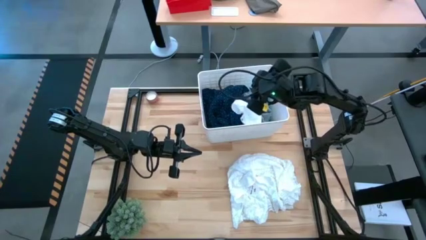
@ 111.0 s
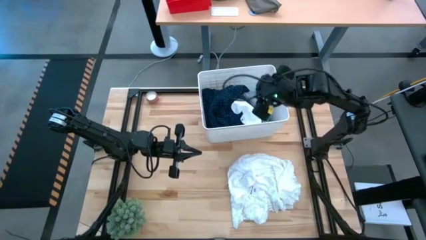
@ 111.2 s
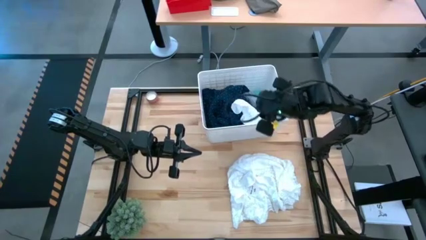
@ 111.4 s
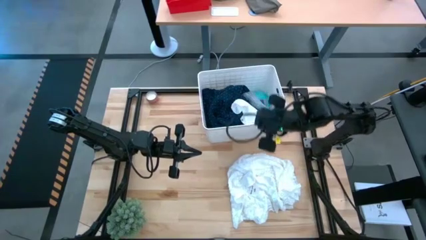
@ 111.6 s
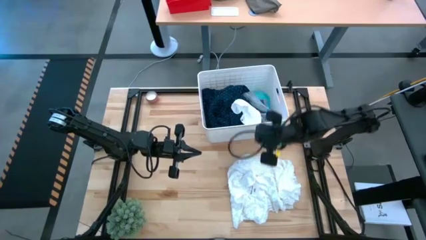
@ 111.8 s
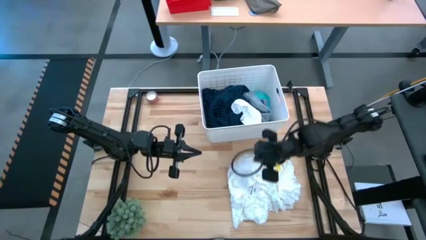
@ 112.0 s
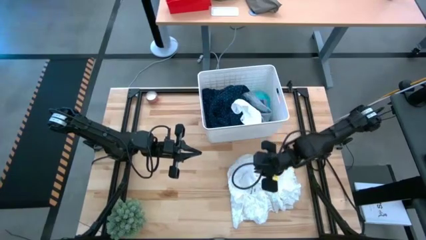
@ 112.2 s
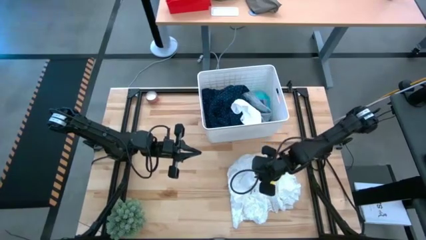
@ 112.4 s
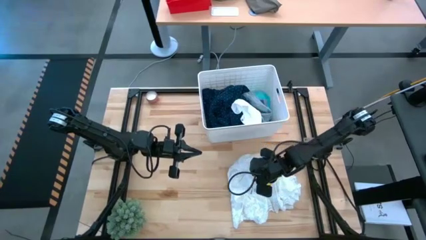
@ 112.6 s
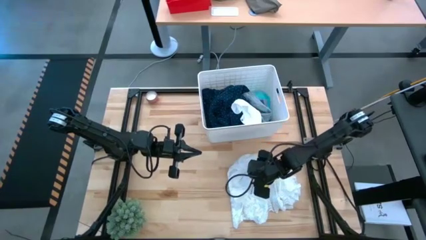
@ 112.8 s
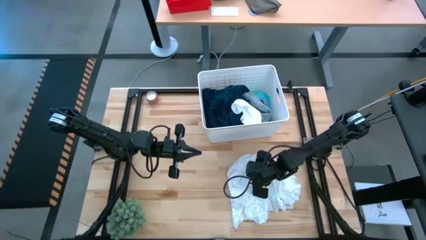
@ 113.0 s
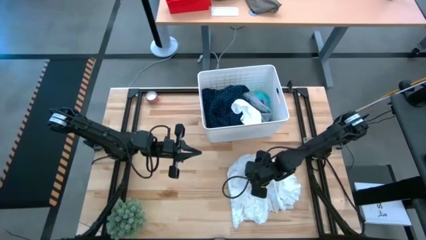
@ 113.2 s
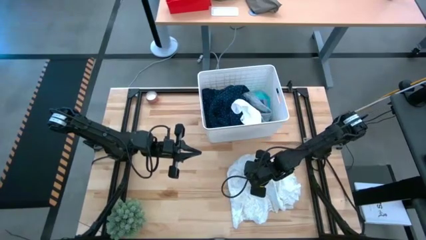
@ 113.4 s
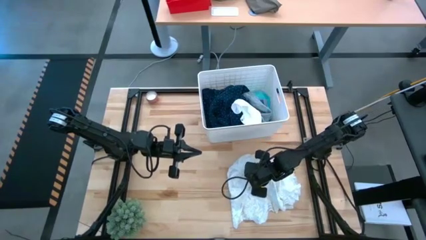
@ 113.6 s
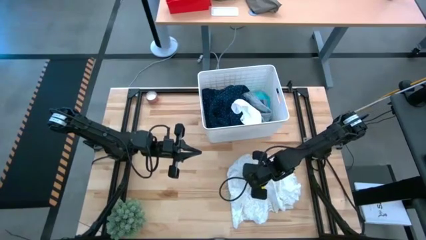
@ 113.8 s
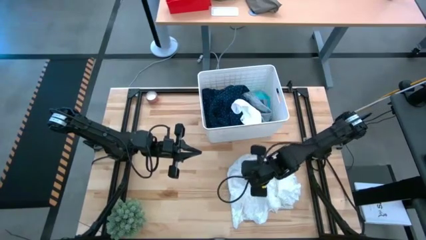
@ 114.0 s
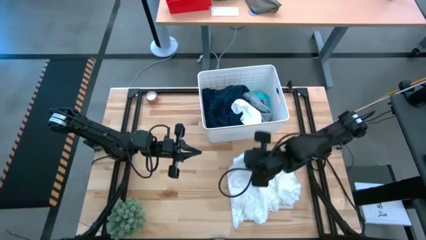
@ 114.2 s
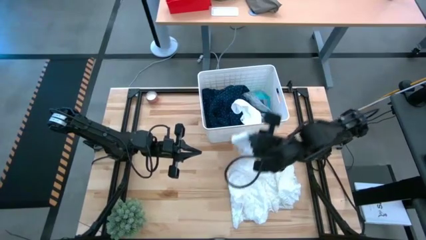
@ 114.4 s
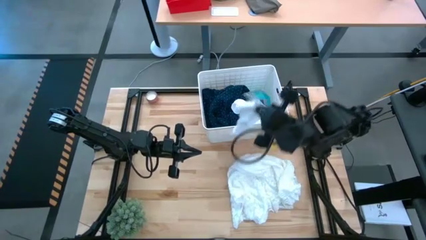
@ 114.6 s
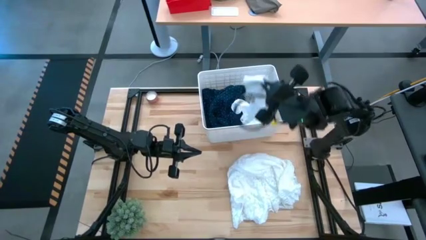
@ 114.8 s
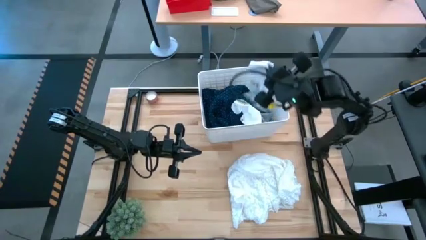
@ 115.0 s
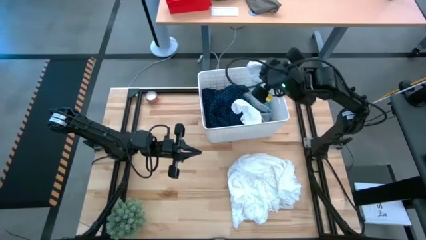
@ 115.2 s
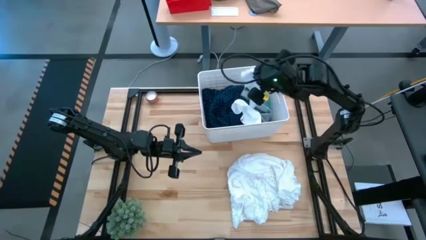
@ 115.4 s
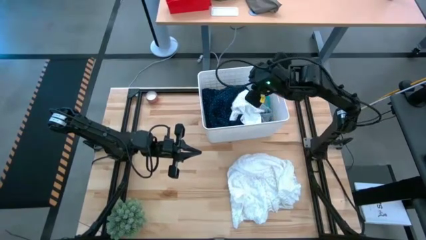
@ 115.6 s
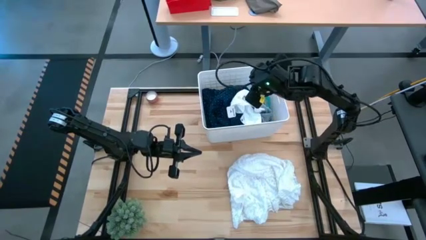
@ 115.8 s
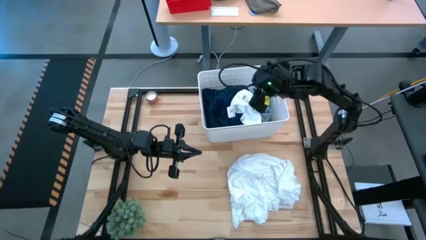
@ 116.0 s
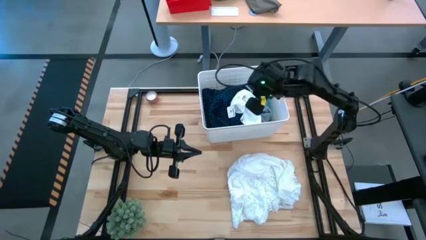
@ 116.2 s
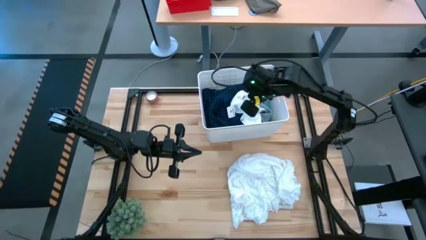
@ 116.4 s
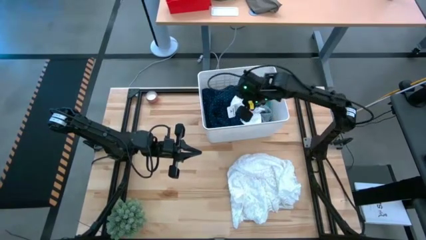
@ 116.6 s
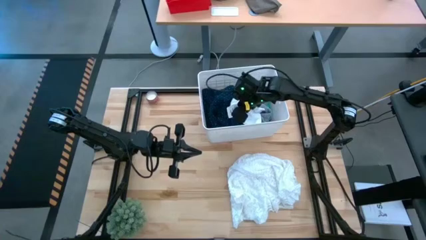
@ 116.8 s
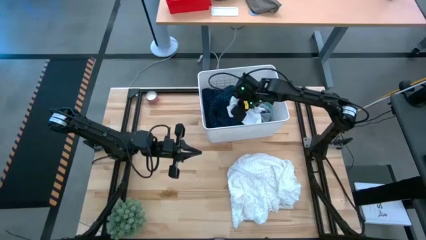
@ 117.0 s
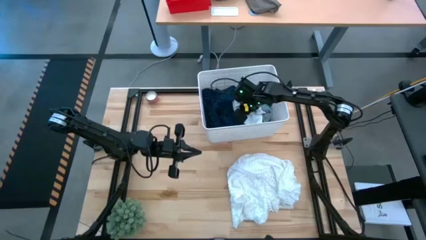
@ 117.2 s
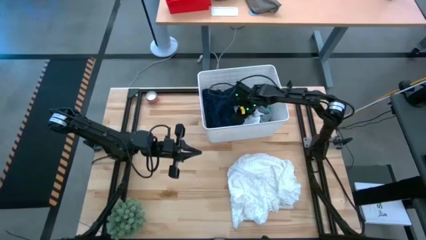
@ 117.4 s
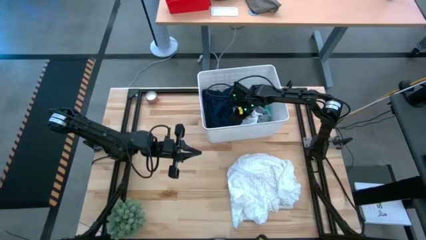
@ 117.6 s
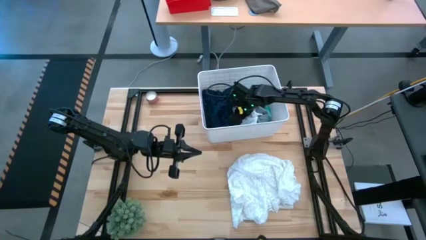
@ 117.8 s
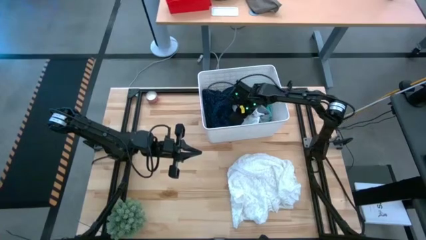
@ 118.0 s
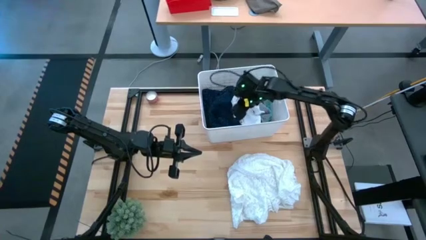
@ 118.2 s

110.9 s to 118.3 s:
Task: Sort clothes
Put the white sock in the bin

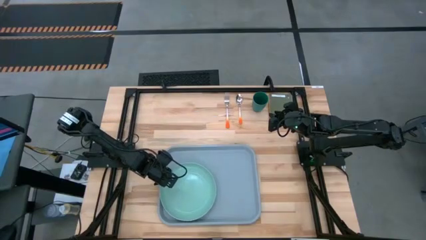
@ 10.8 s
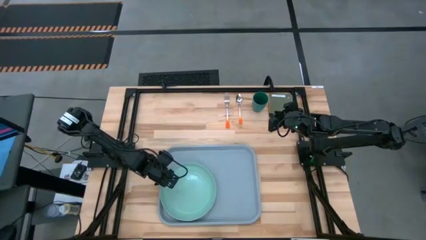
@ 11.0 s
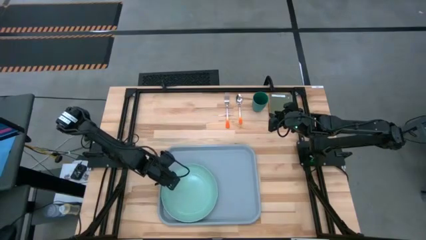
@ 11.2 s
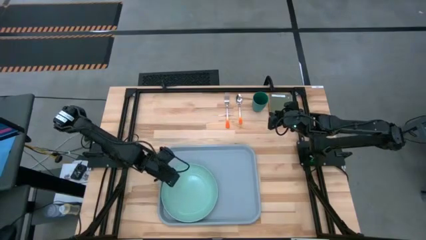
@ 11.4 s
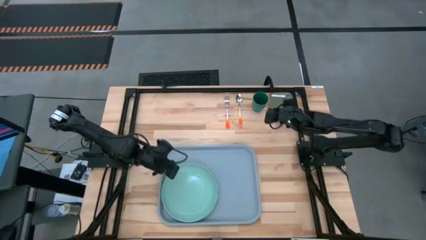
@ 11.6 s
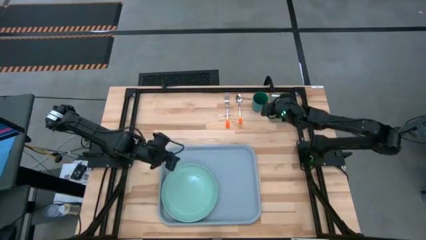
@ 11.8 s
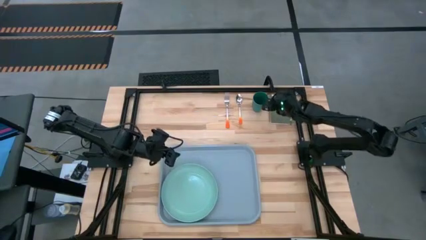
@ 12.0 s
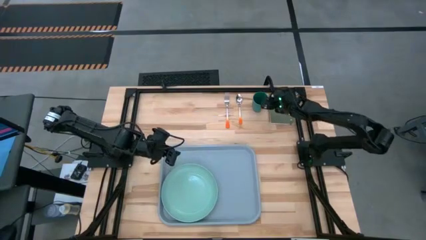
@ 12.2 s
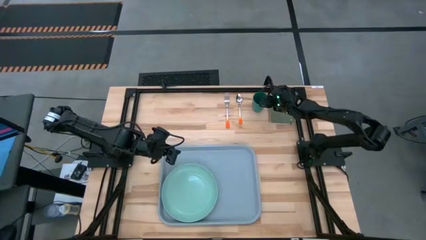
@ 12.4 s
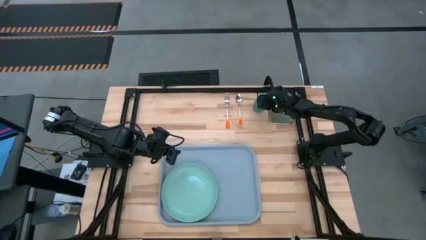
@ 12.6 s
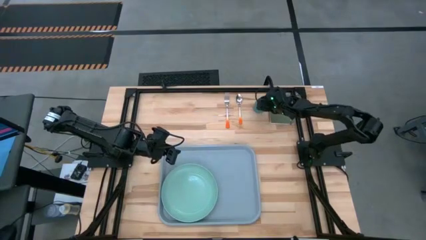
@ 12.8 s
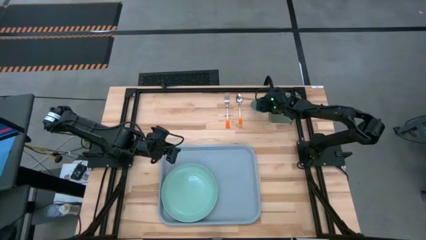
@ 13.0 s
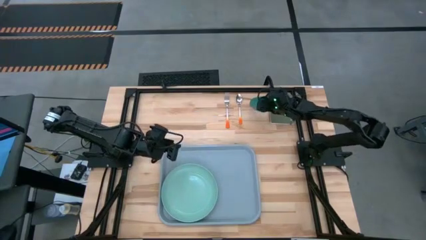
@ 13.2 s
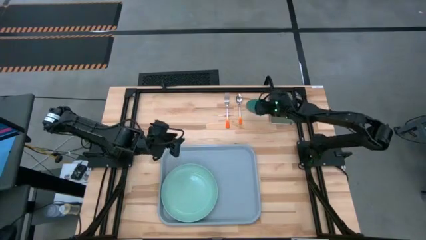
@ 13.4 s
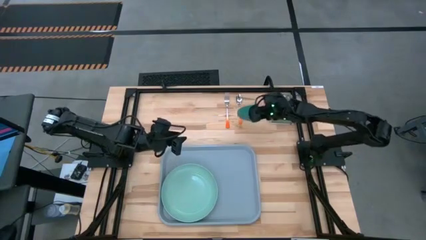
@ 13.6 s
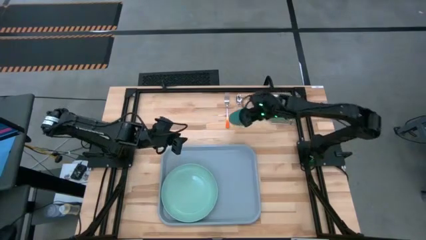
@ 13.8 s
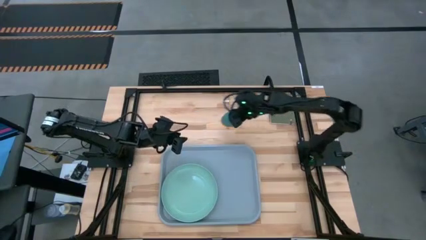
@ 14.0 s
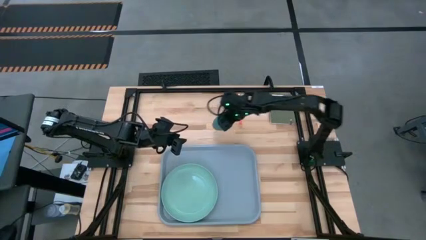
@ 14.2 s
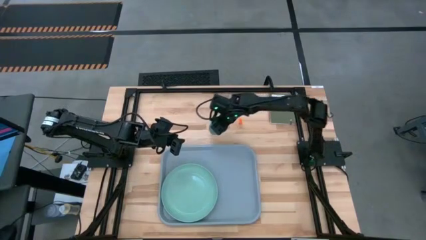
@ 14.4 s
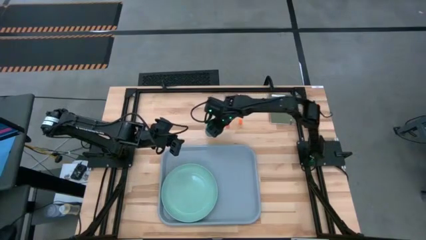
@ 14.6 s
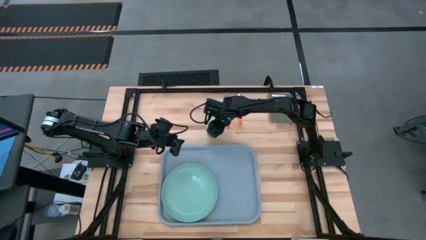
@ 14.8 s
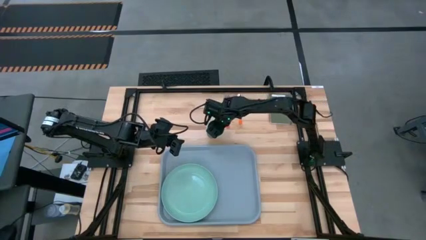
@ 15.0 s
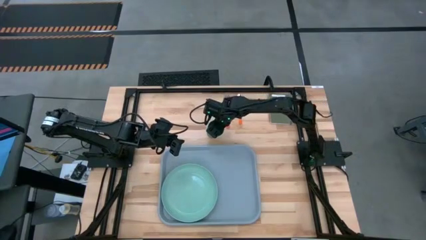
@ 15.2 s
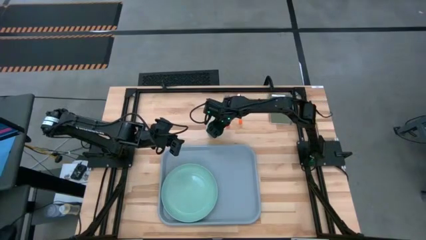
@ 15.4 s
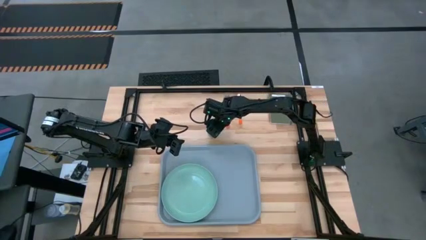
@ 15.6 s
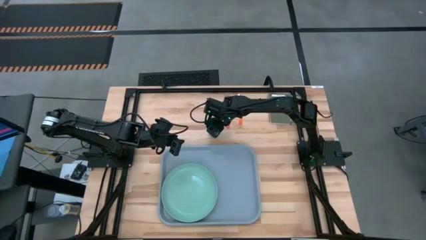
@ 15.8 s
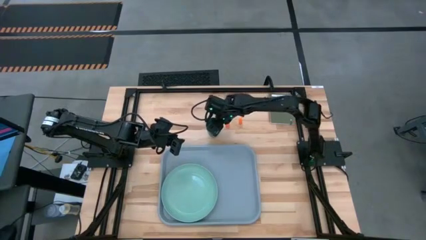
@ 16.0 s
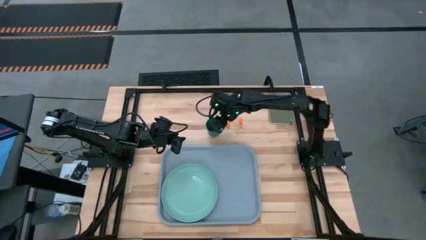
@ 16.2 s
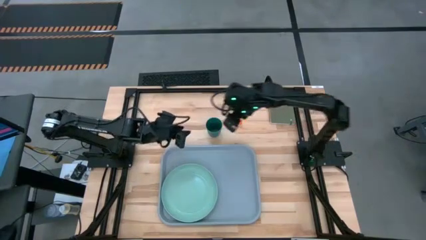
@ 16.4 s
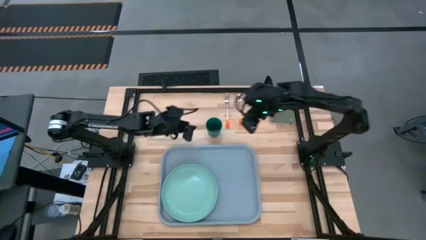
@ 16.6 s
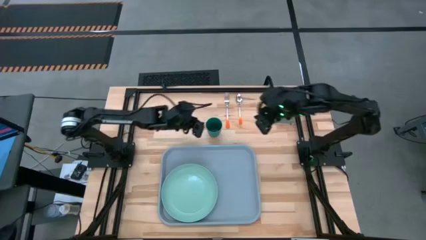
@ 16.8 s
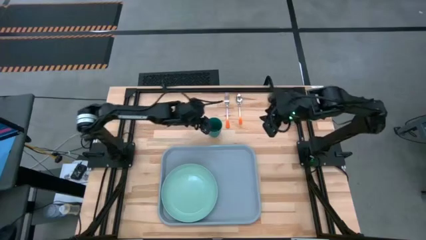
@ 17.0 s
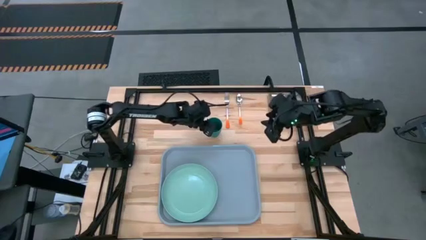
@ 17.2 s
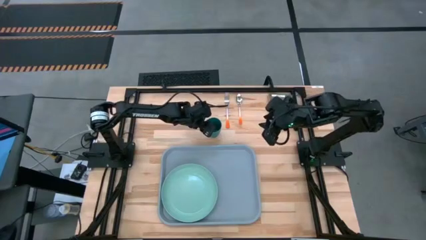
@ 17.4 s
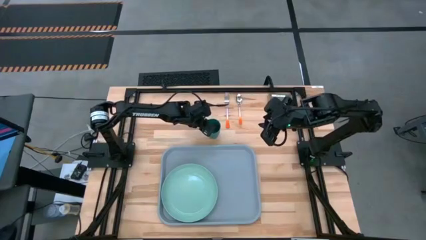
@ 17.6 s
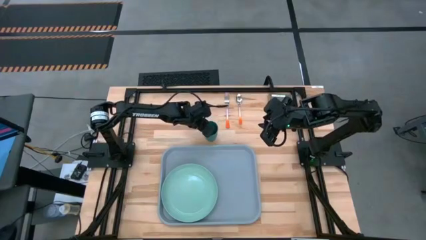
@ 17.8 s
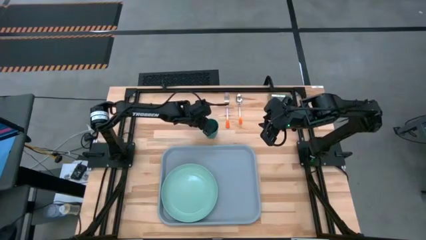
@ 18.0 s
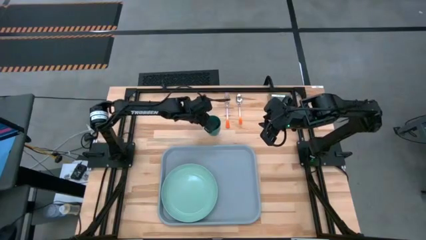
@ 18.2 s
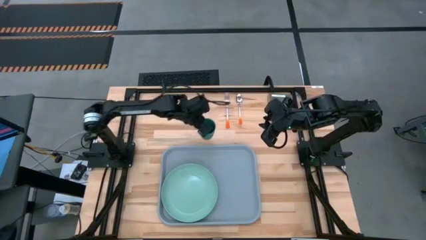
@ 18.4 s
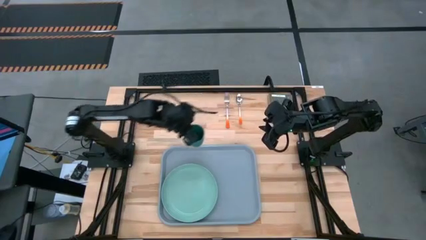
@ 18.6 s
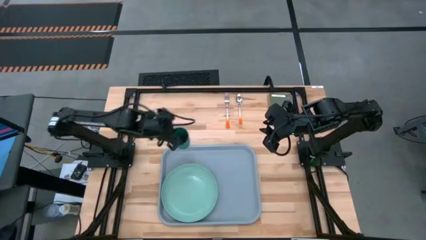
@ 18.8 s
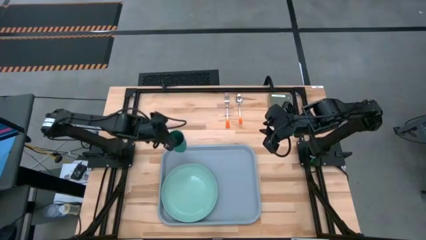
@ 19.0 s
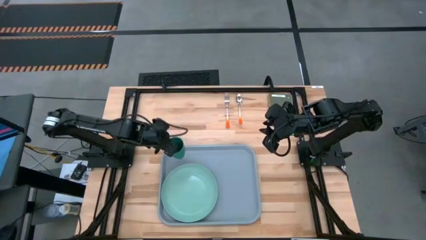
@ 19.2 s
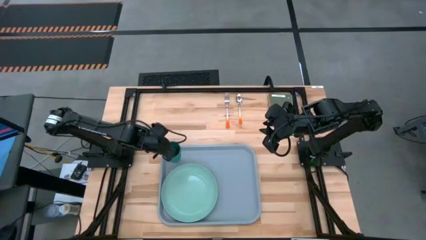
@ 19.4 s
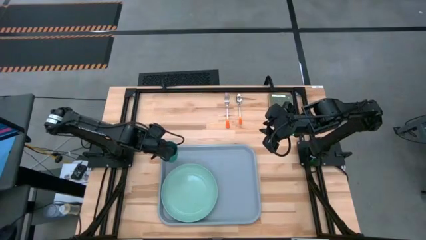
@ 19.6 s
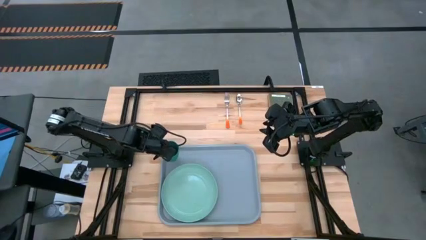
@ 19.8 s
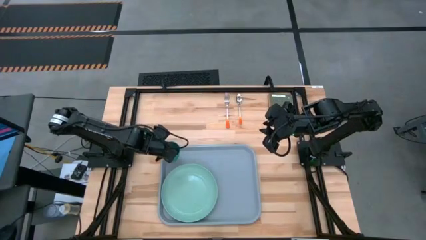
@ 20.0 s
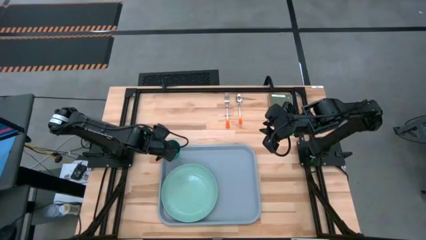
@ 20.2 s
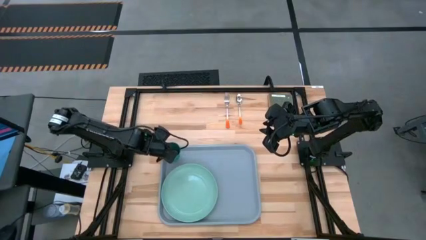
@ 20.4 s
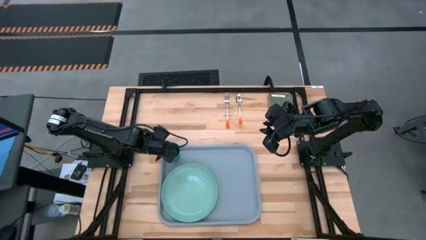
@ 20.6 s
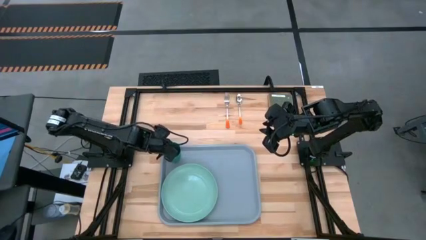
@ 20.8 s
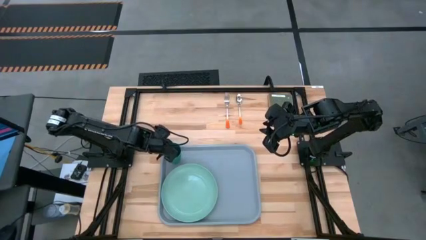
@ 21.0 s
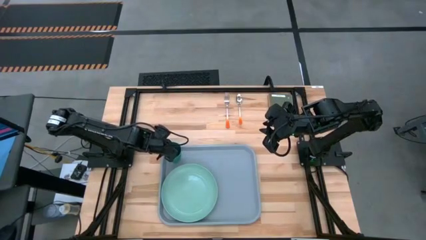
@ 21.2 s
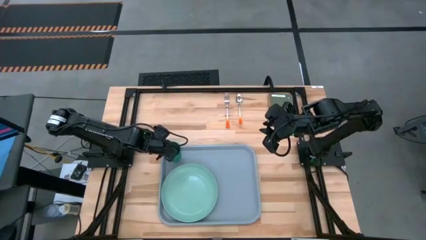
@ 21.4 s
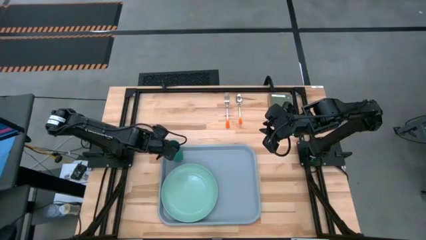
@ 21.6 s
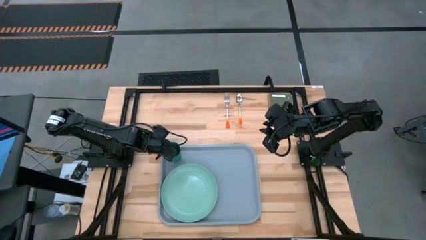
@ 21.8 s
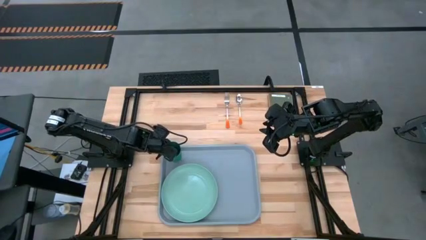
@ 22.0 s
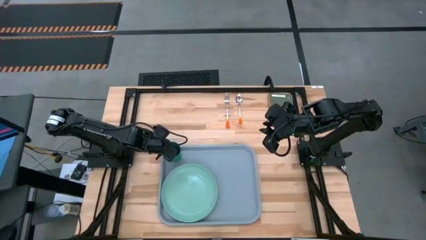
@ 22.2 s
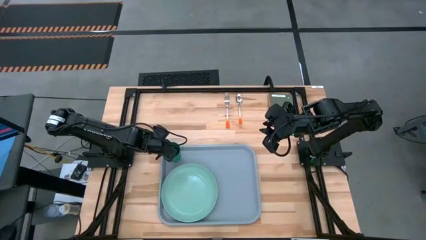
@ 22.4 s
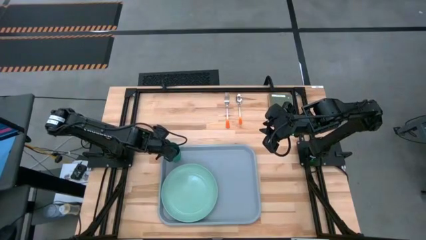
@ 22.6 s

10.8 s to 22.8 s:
Task: Pick and place plate/cup/fork/spoon on tray
Put the green cup to the top of the green plate on the blue serving tray
